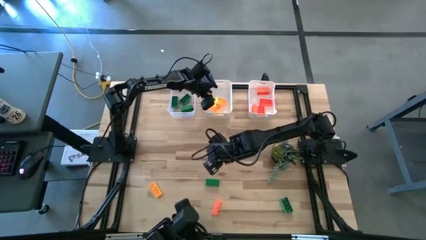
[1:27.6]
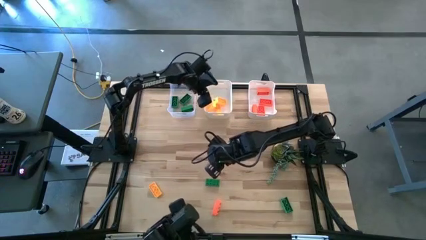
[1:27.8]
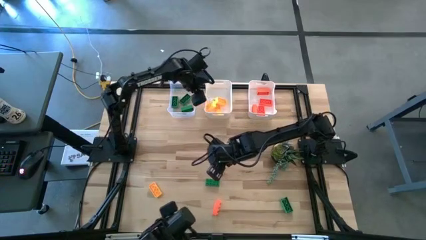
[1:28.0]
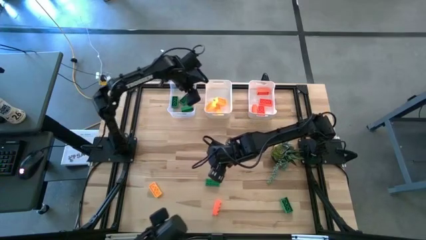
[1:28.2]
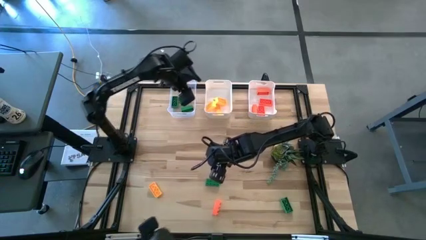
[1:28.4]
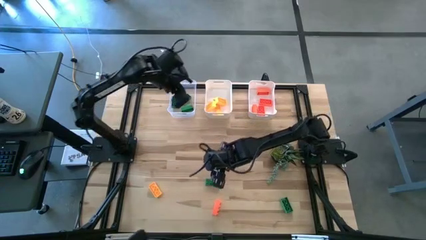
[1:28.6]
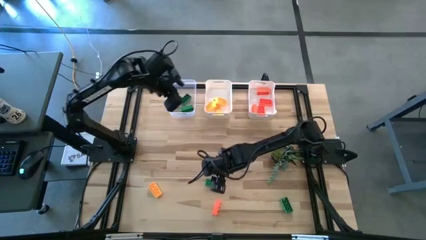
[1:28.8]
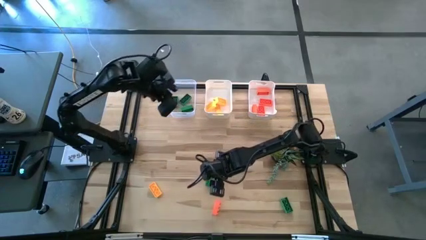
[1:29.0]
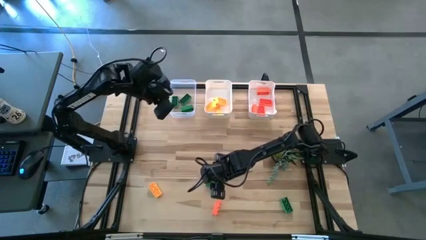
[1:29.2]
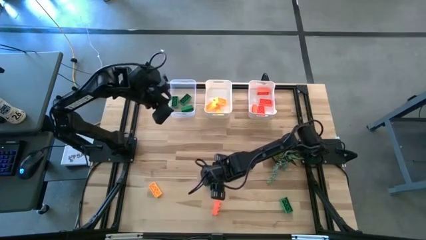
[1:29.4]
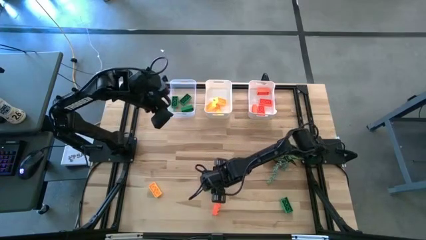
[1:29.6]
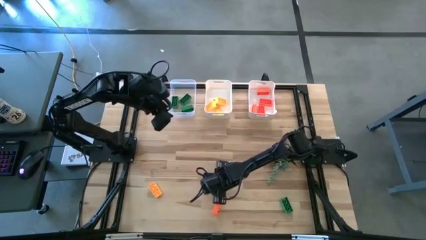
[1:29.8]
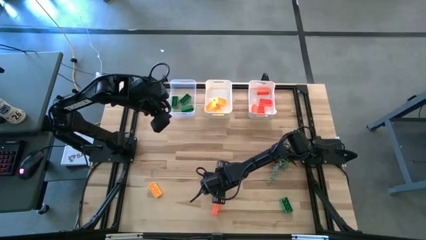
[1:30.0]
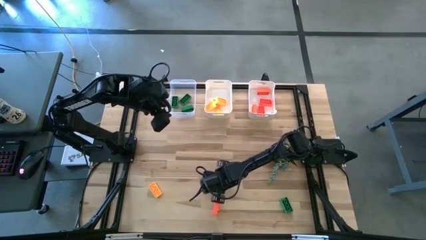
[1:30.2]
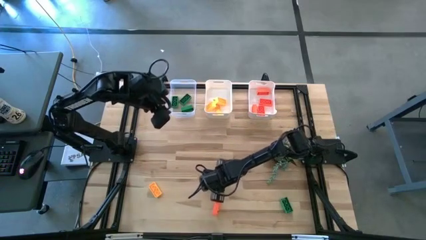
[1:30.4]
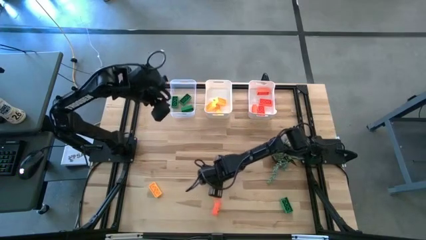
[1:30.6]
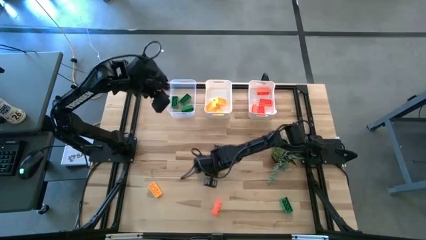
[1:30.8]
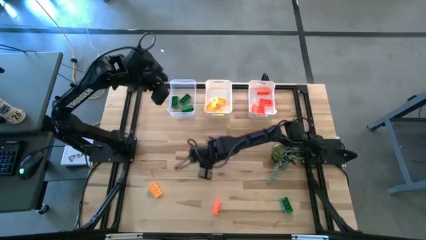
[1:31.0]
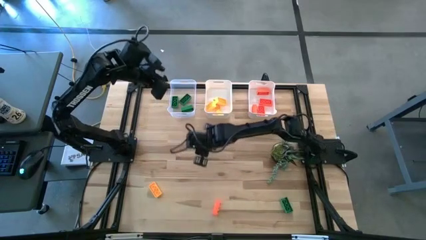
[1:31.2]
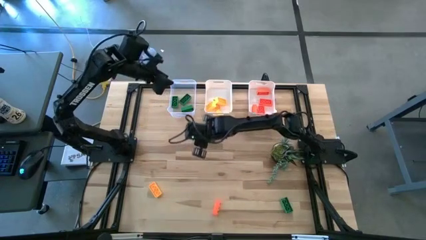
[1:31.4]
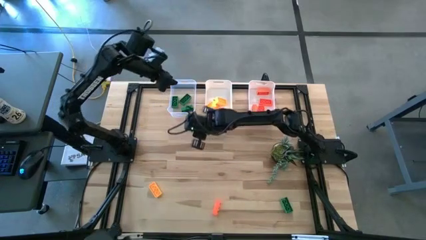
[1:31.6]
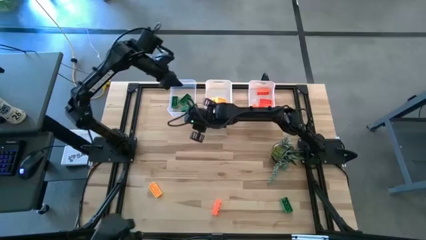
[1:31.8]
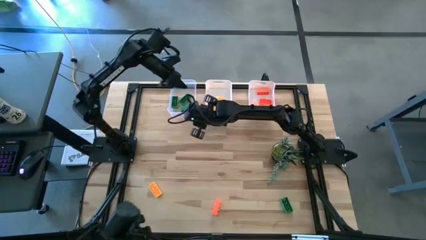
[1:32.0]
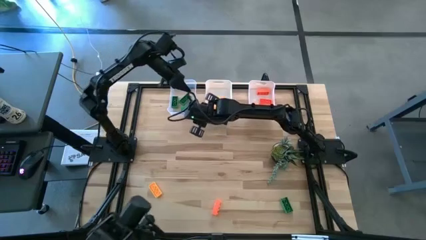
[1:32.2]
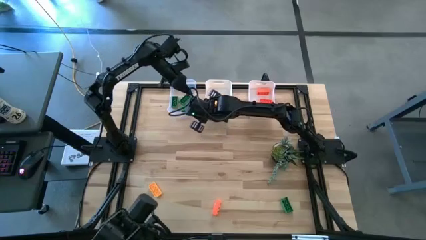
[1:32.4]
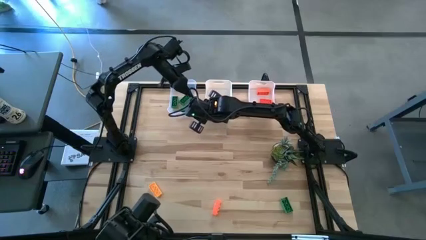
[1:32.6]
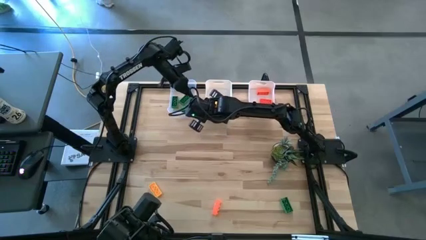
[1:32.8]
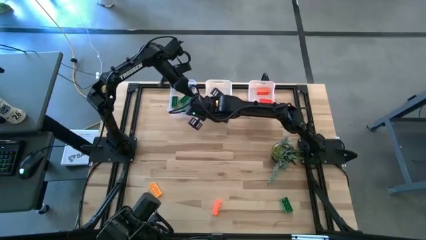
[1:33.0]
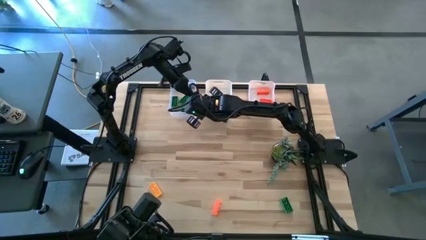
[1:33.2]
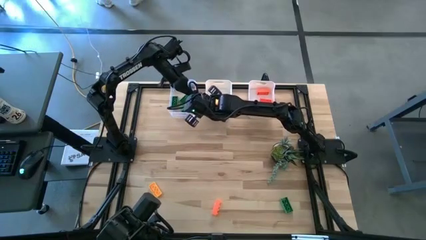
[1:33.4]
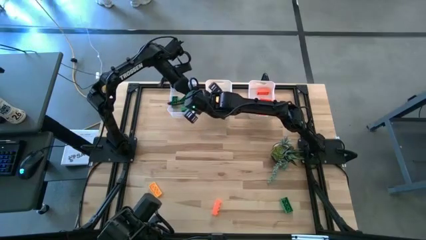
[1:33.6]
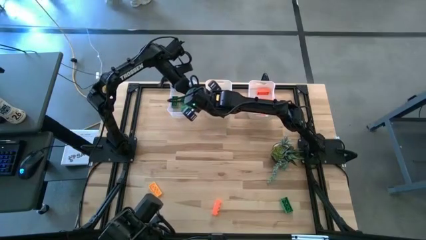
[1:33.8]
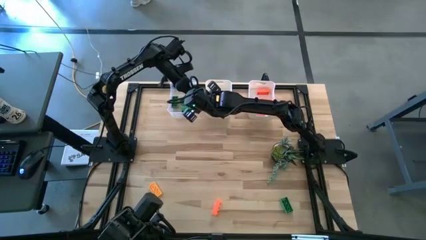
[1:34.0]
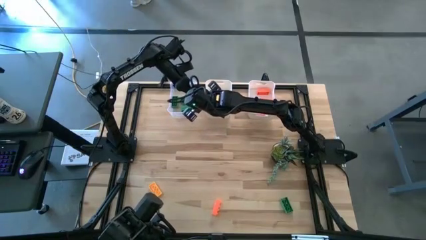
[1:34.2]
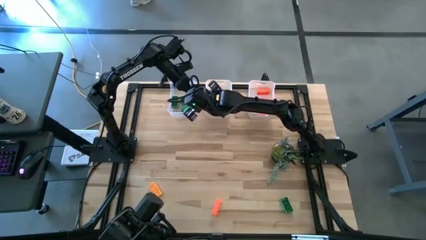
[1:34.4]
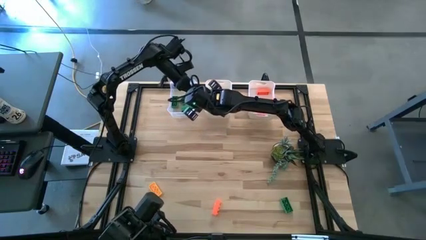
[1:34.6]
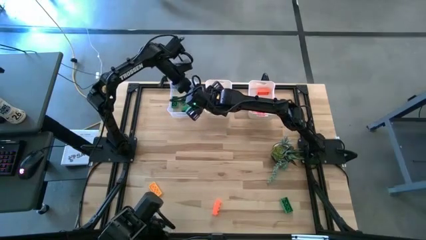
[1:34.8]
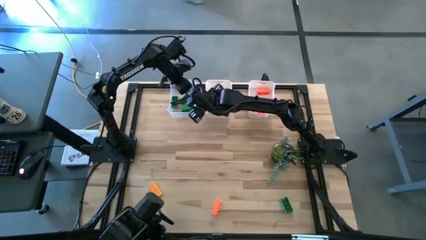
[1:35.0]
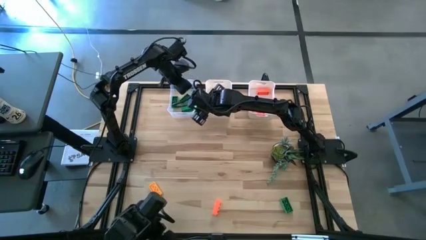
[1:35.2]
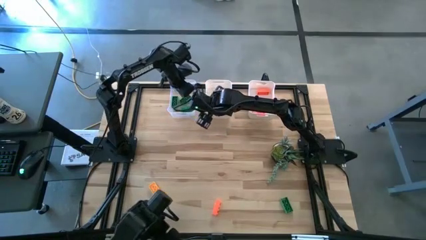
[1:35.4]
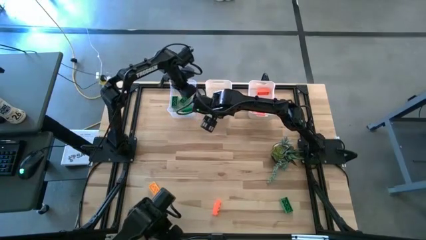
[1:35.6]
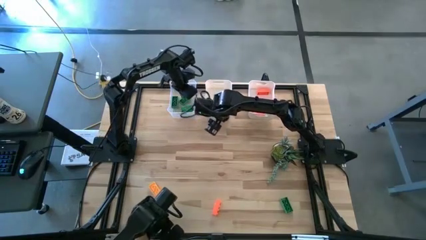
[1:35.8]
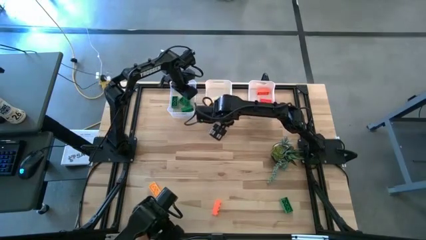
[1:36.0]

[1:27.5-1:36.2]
Task: Sort & place blocks by color
Put the green game piece into the transparent bin

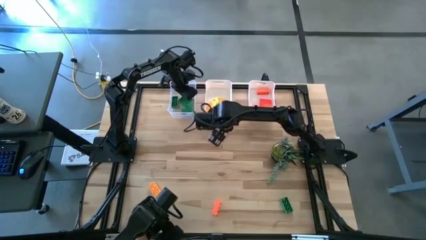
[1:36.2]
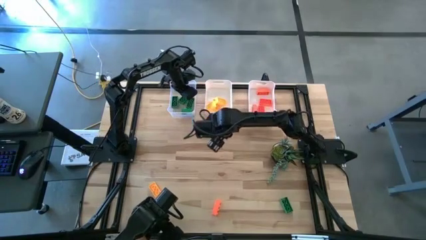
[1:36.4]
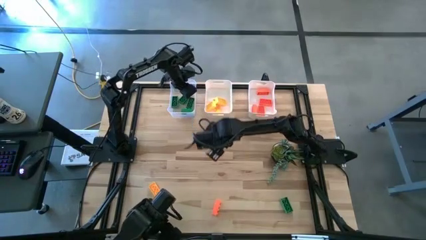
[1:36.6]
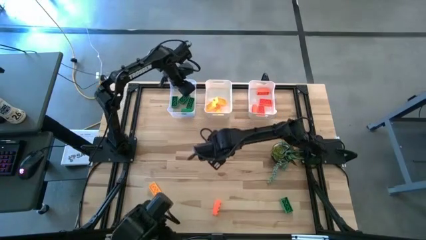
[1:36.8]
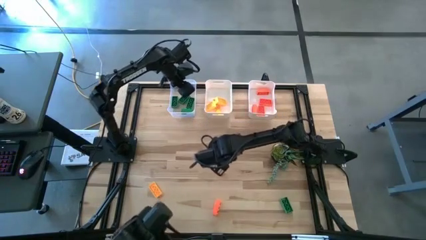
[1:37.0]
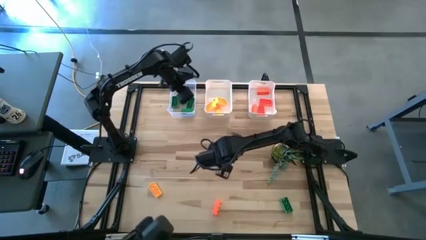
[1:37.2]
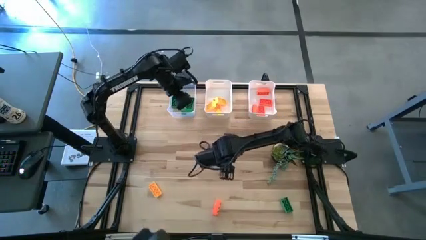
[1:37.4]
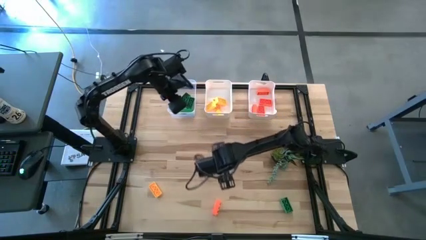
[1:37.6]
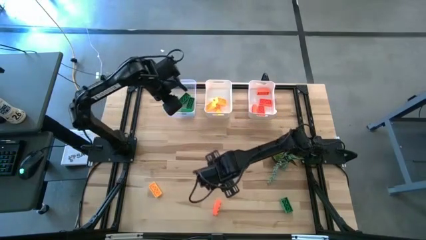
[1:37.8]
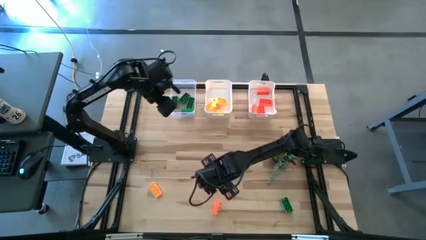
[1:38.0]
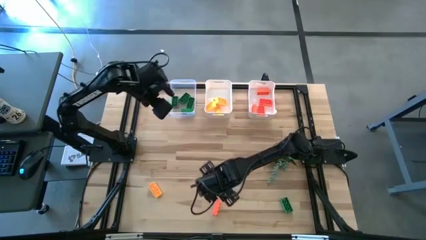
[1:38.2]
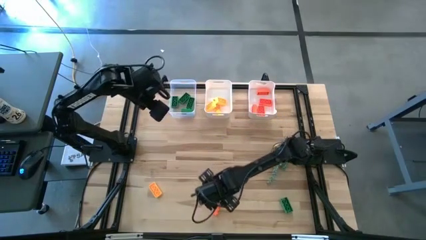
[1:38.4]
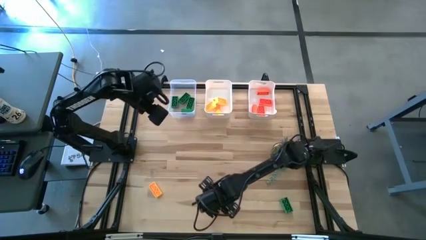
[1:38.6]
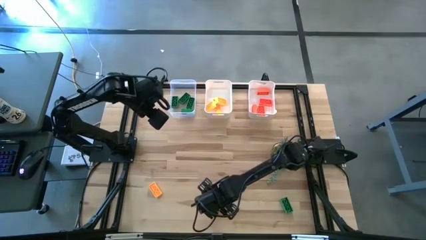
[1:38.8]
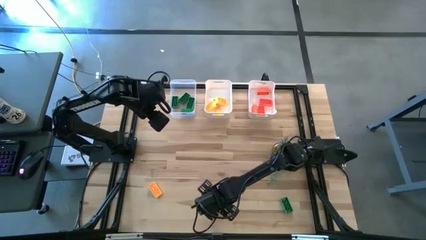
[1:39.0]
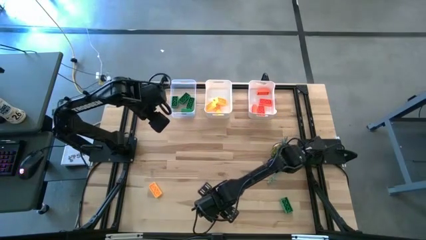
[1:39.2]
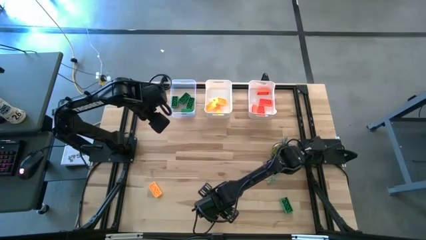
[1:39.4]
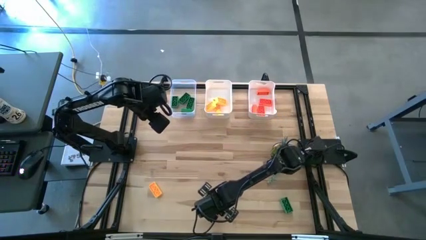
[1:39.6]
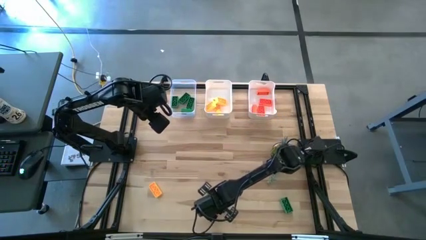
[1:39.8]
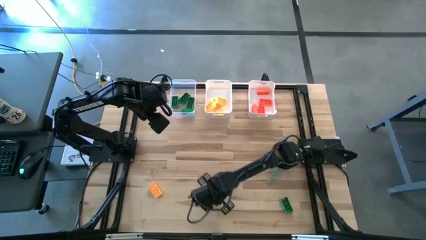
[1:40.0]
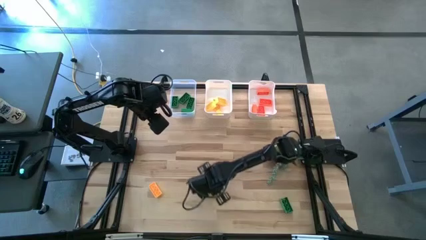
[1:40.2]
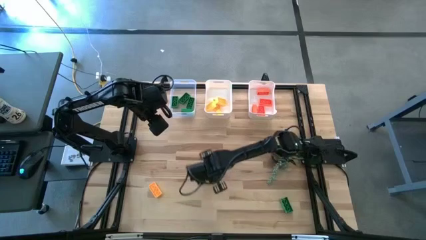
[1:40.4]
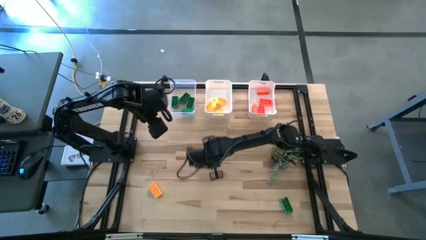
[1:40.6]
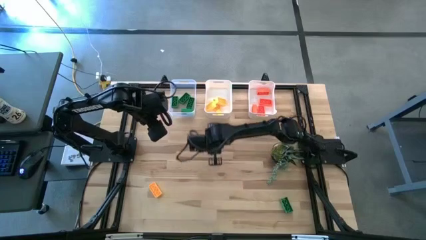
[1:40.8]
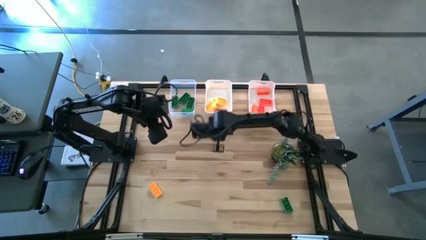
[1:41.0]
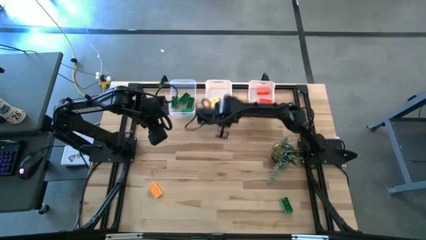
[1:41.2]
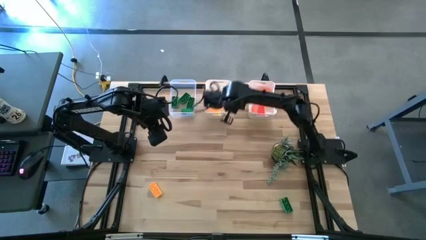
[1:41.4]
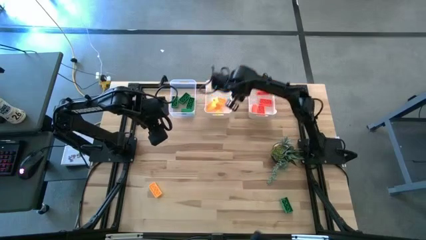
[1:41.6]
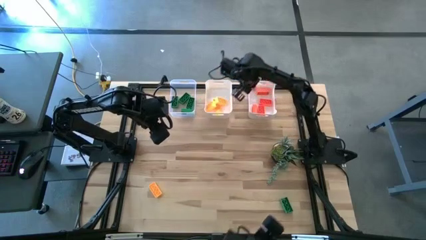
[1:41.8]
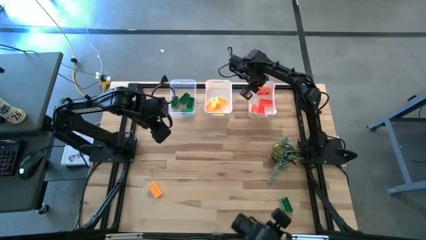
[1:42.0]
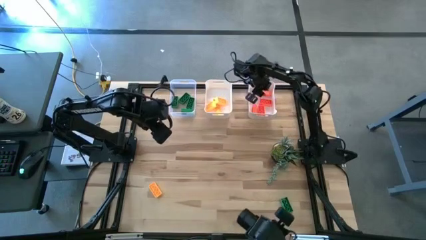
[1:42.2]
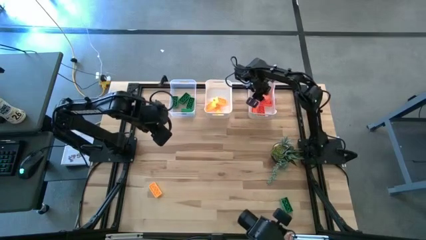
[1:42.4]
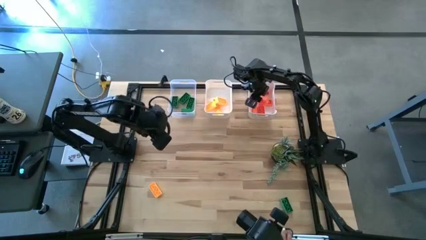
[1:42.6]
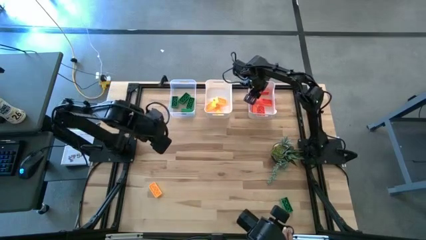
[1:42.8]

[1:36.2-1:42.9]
Put the orange game piece into the right white bin
